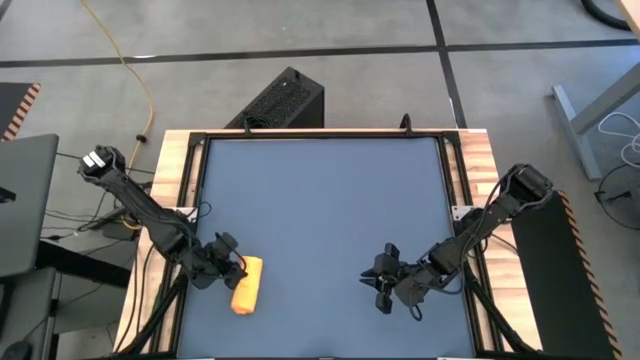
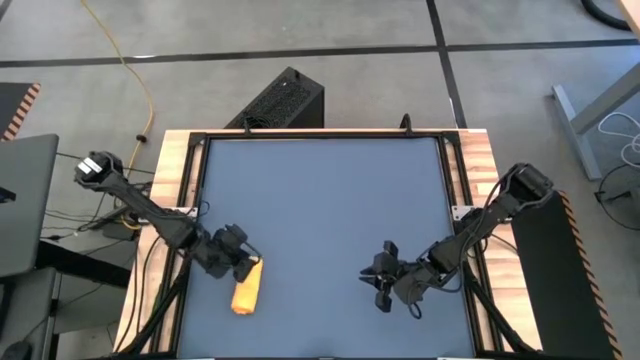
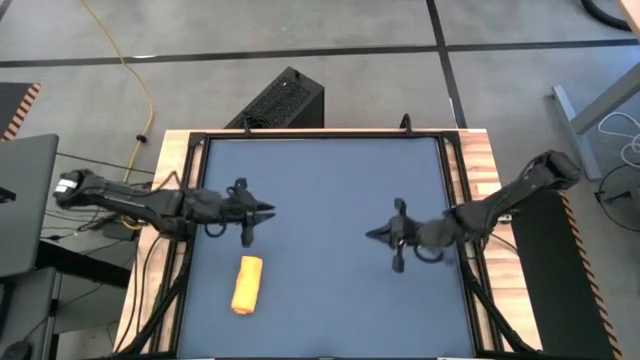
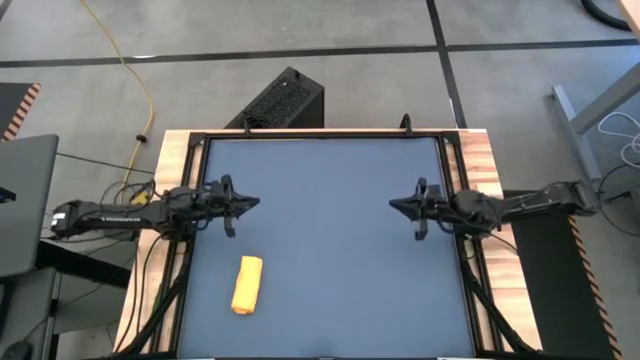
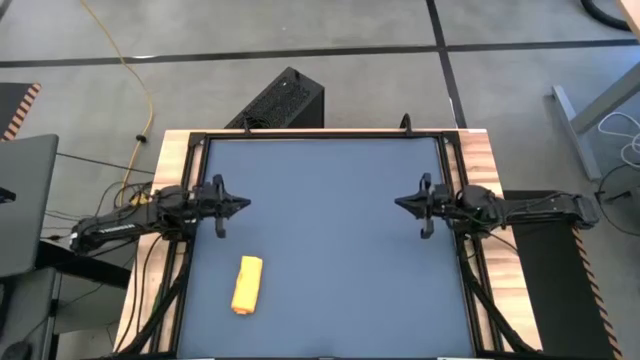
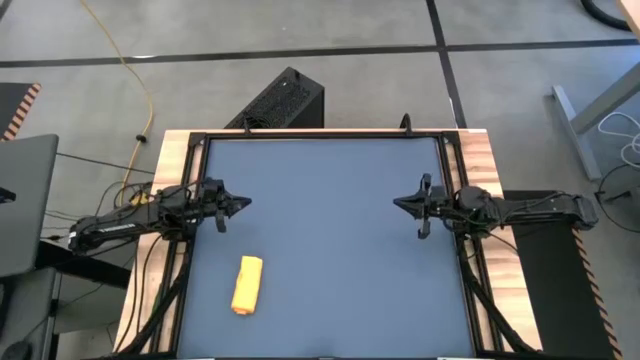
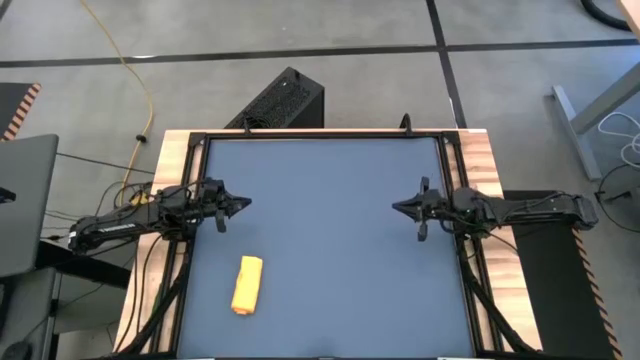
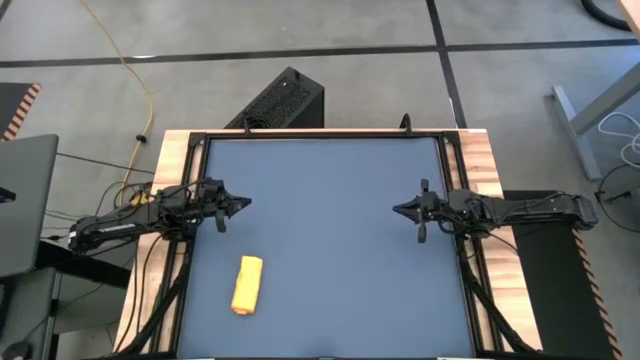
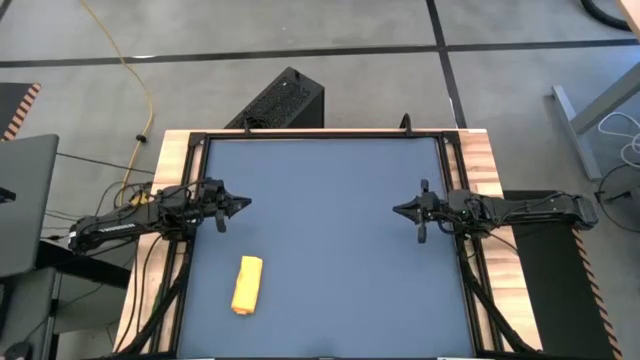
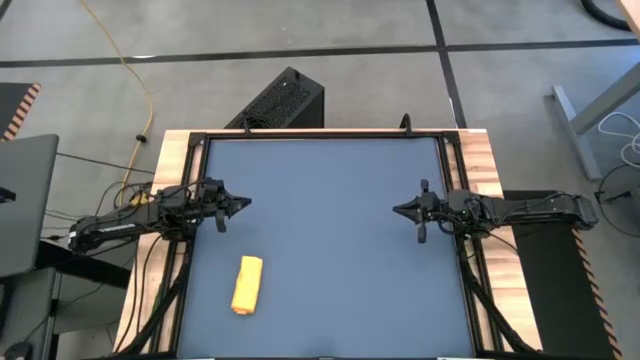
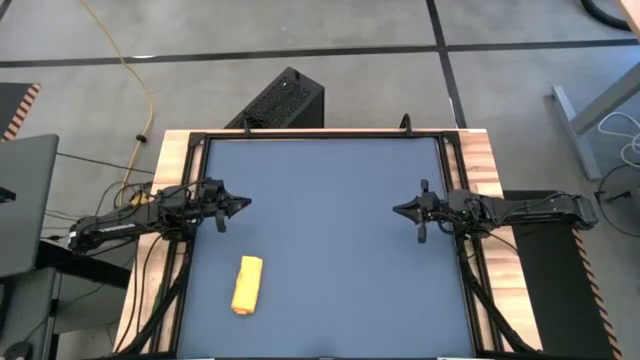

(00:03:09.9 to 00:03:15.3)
Task: Roll towel into tight, uniform cylinder
Return to Home Position

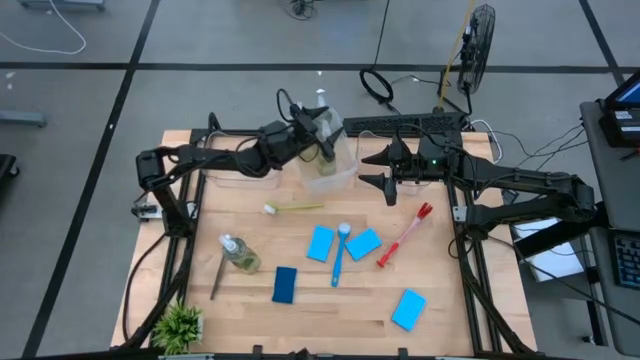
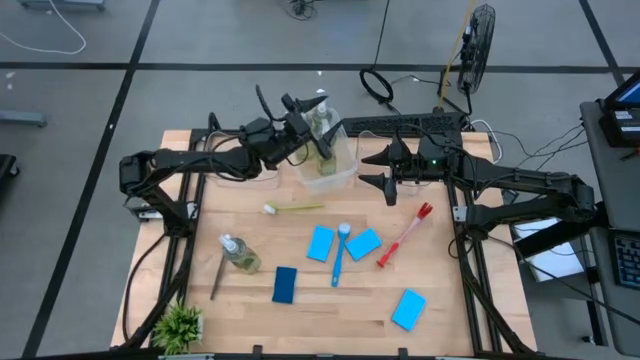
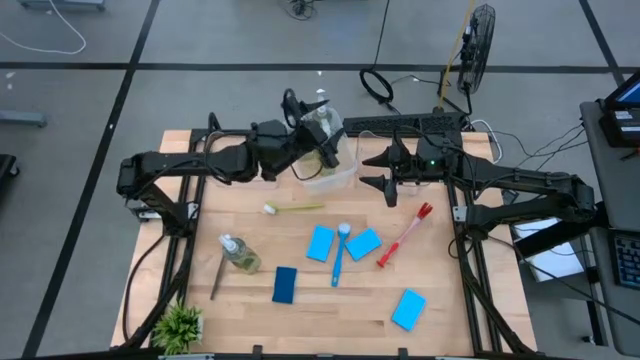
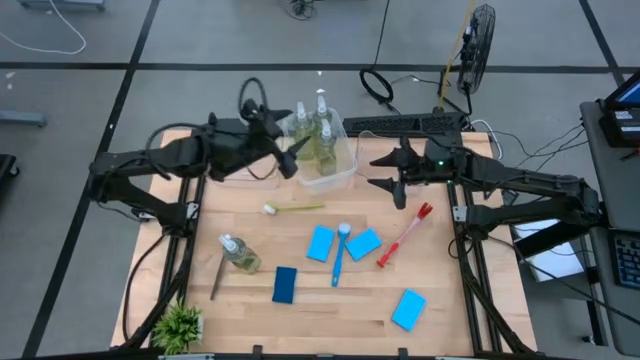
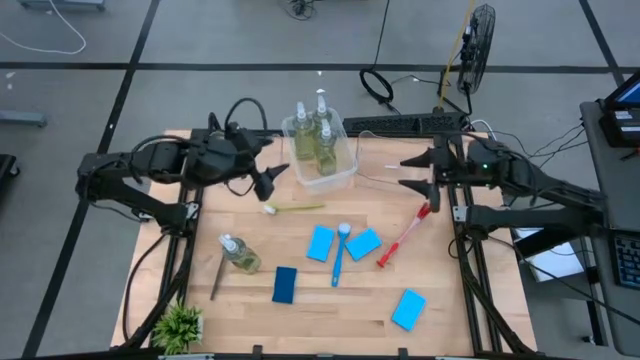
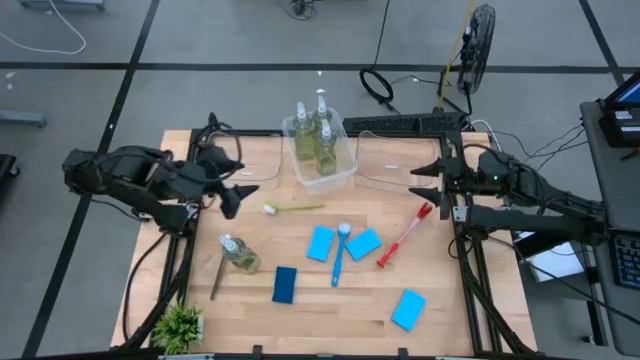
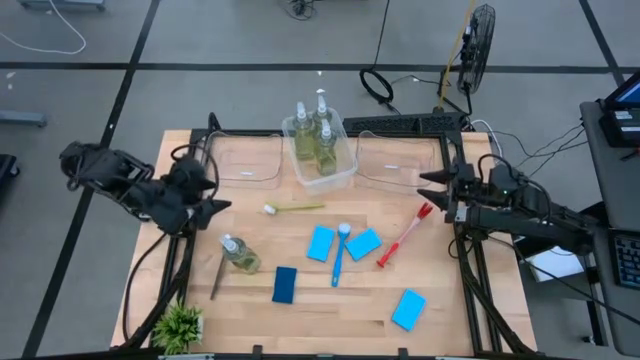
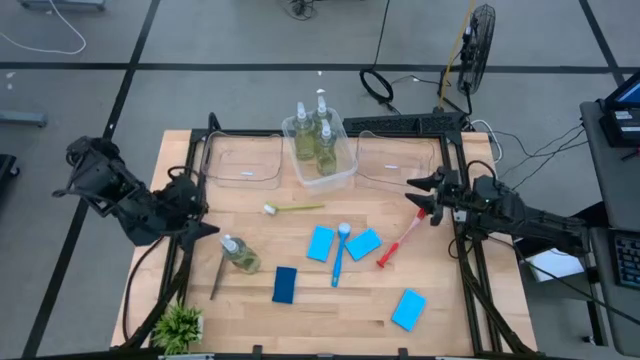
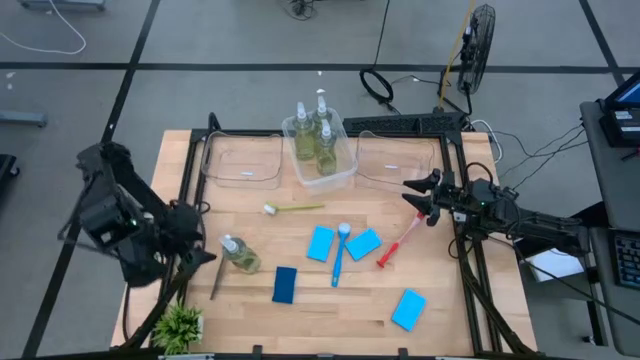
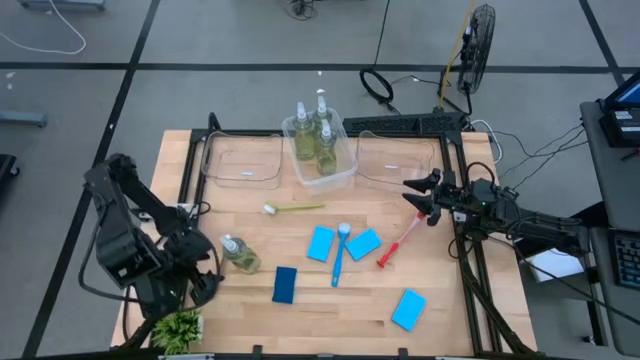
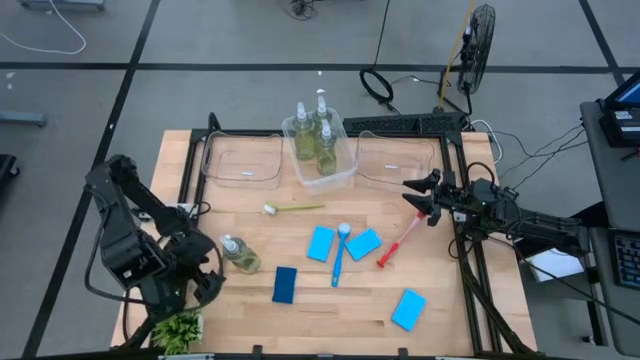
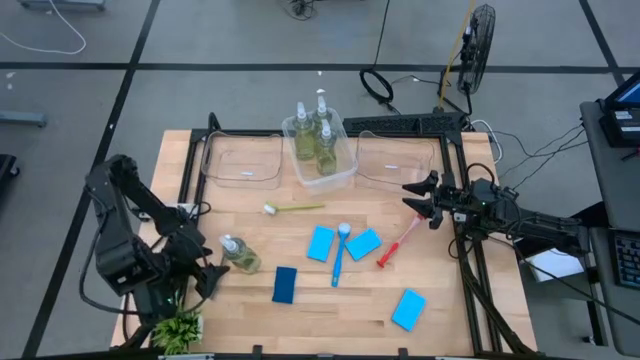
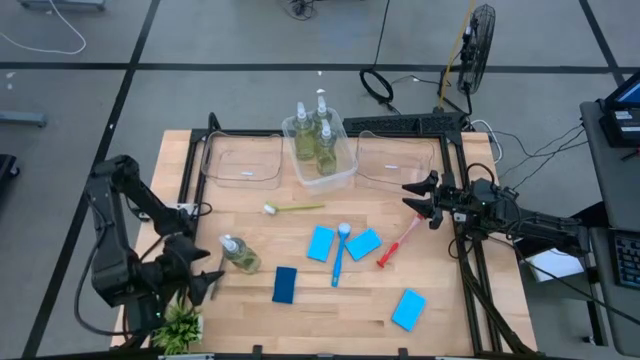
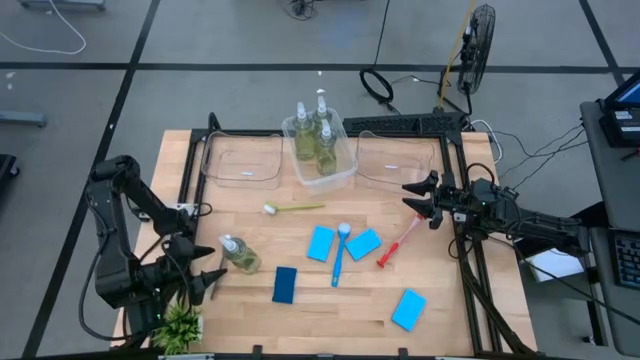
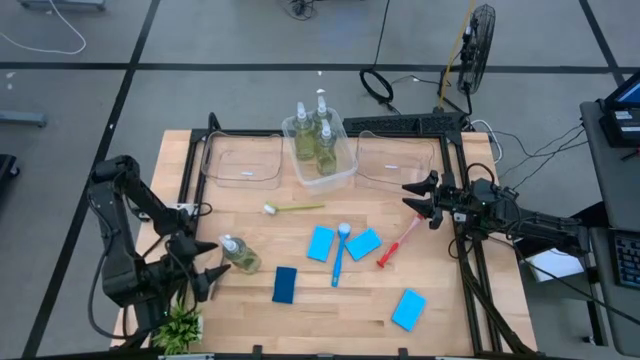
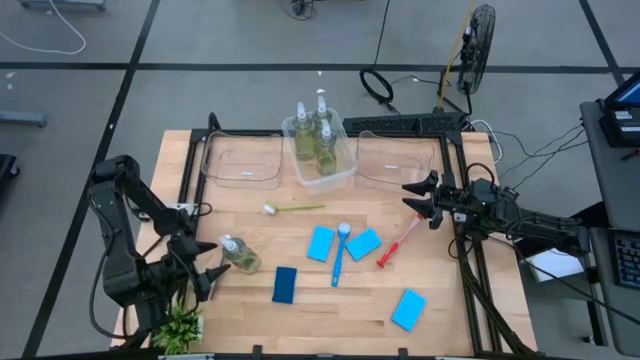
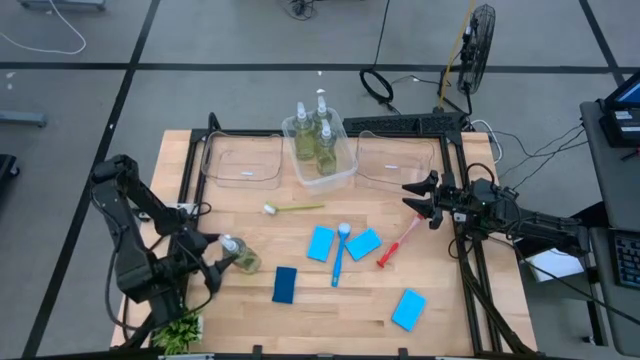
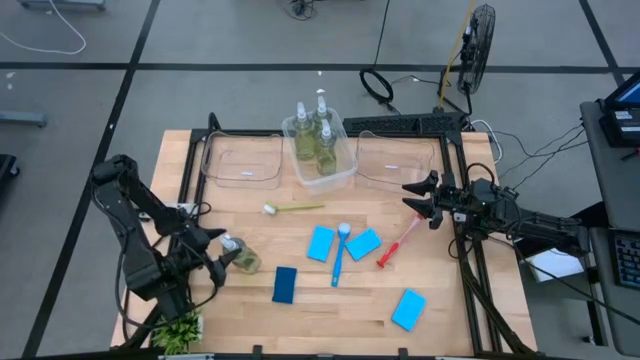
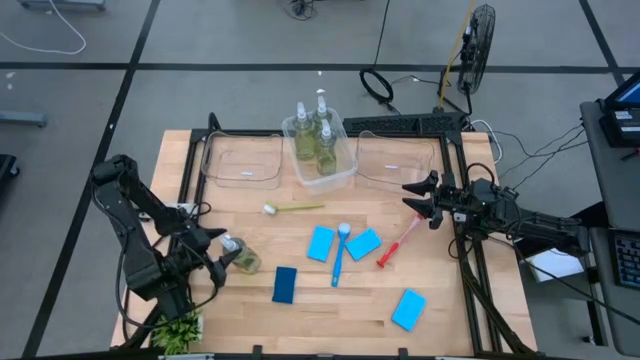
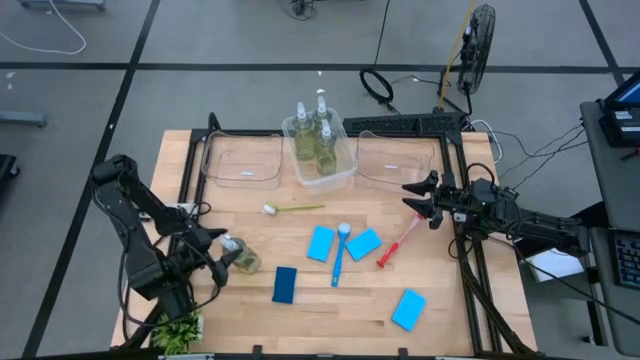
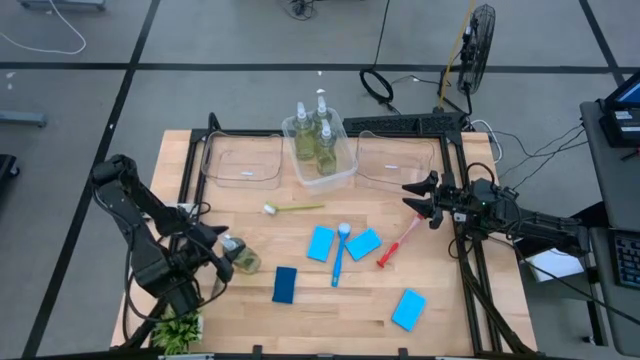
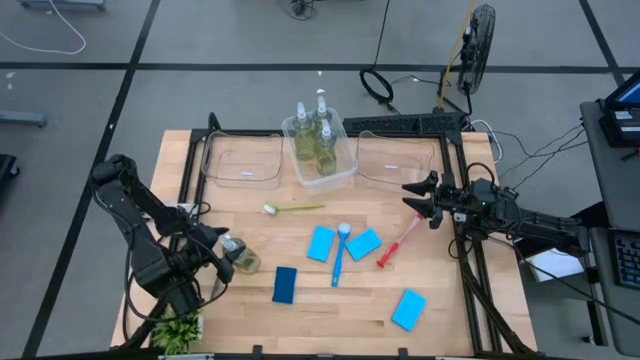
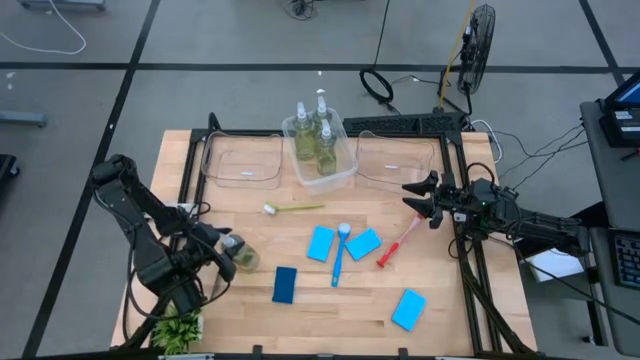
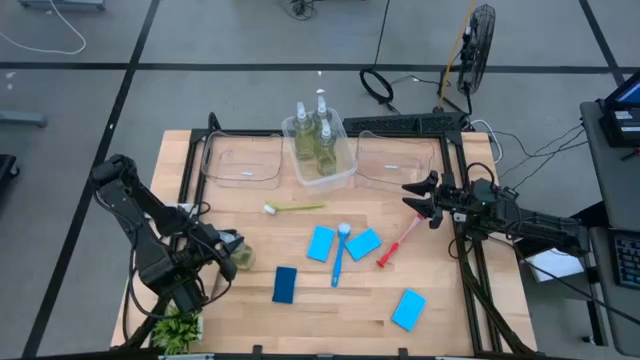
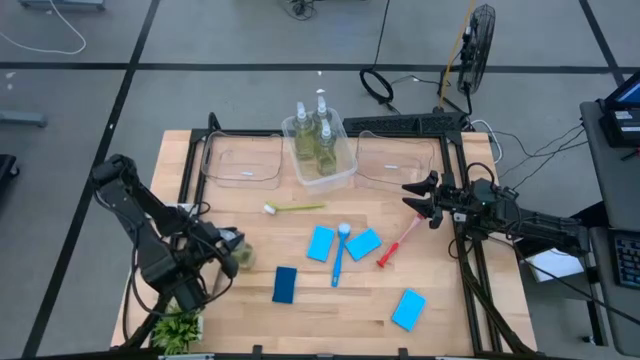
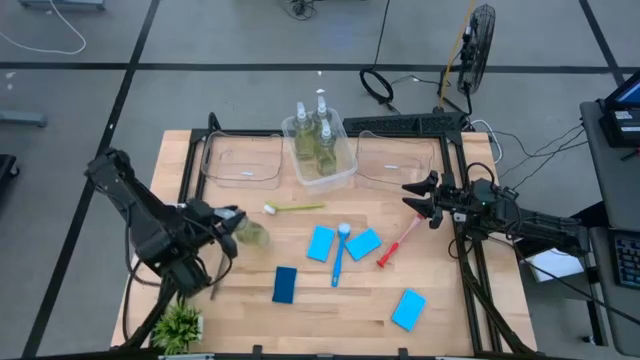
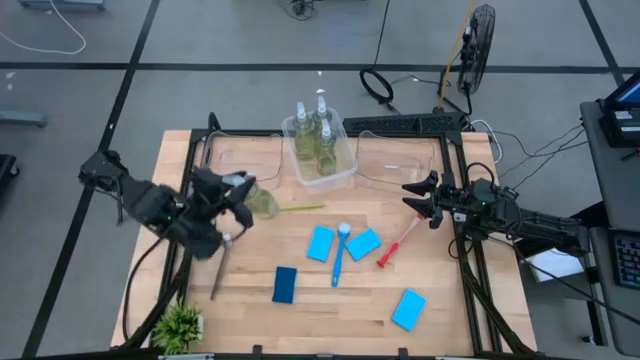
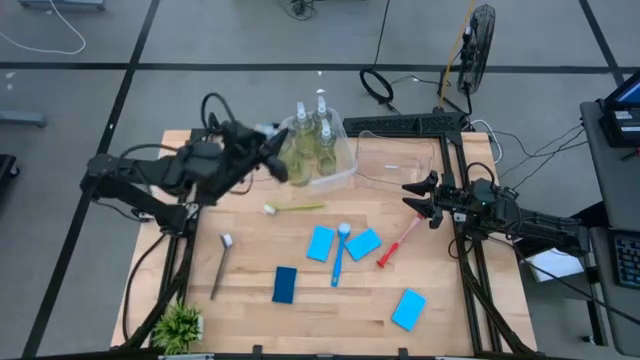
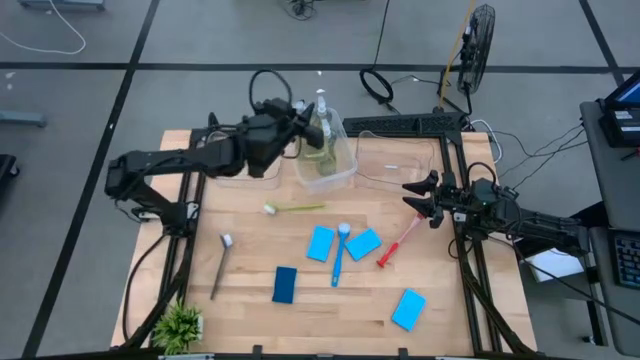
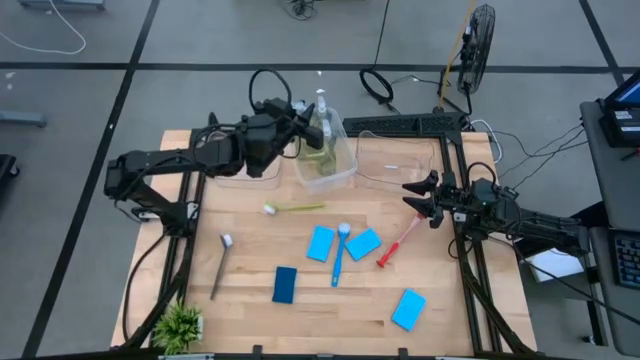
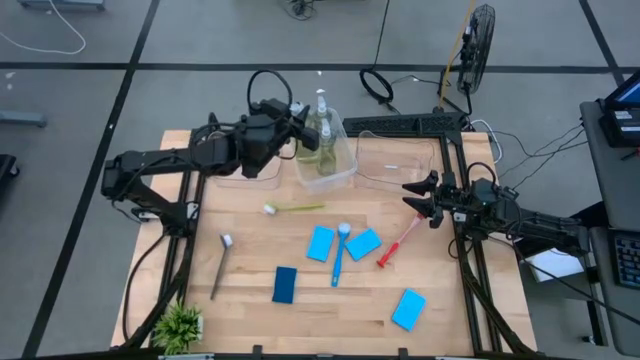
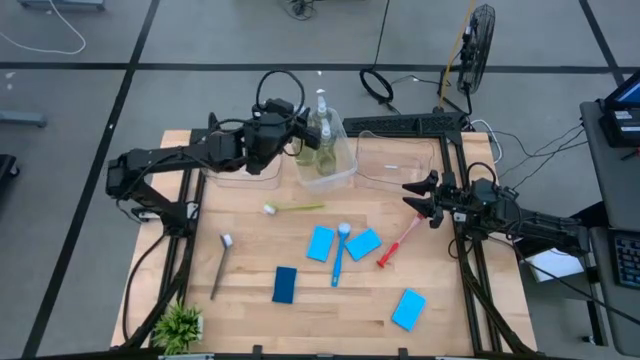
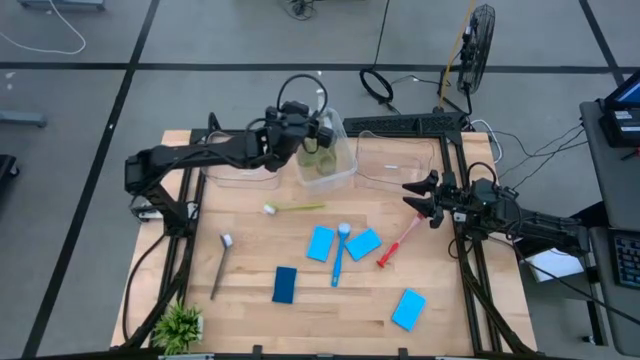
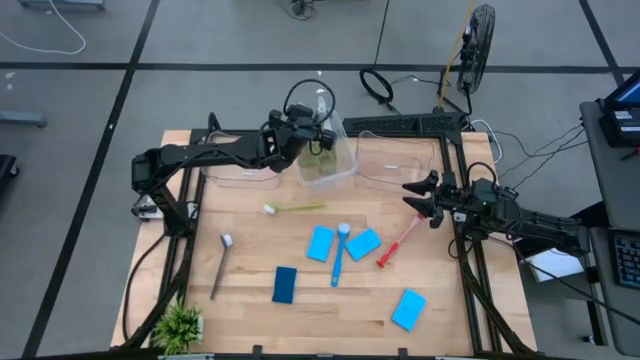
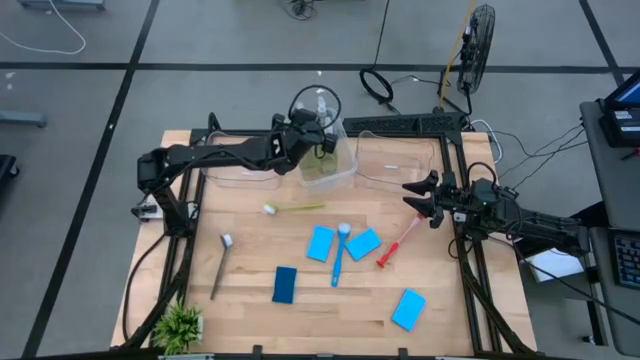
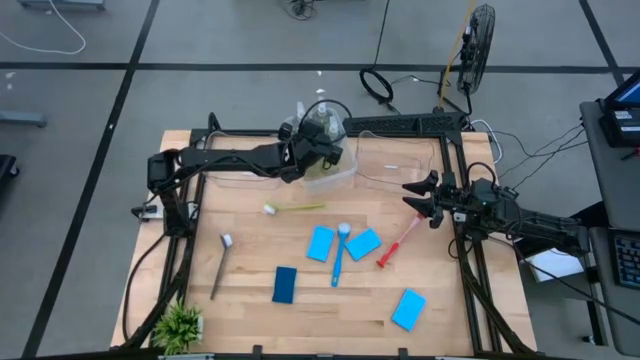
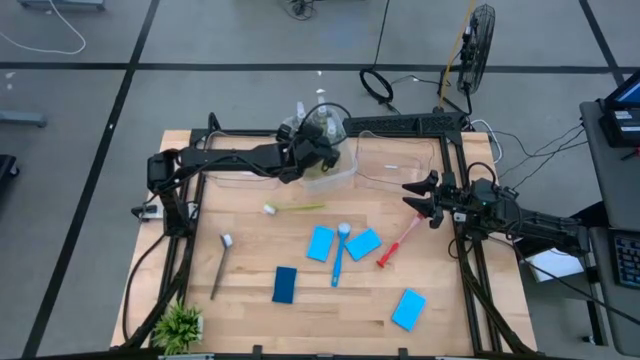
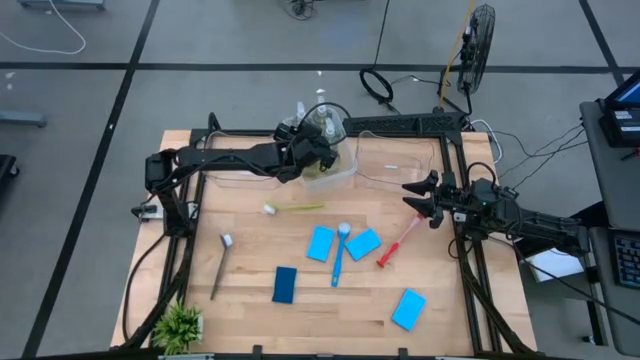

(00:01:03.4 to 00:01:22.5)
Task: Pick & Place Kitchen Sink Supplies
Put the yellow dish soap into the white bin
